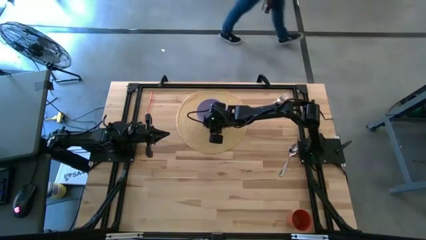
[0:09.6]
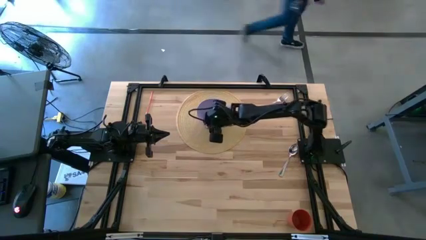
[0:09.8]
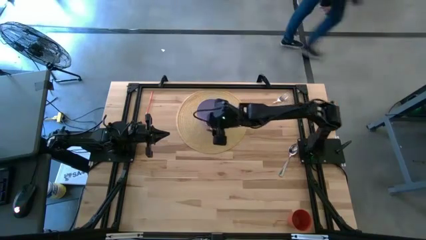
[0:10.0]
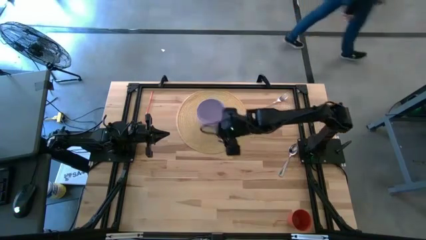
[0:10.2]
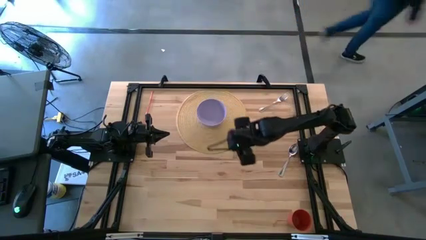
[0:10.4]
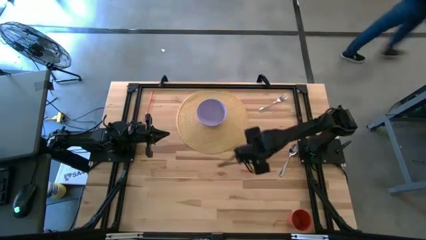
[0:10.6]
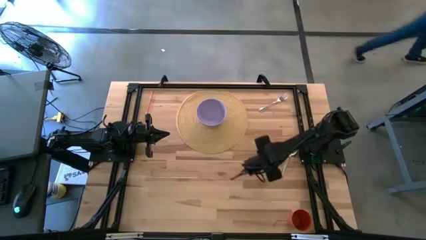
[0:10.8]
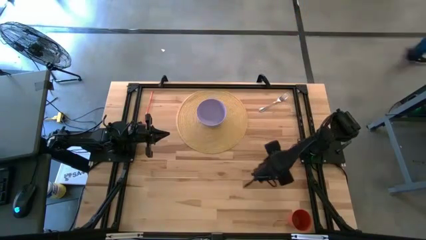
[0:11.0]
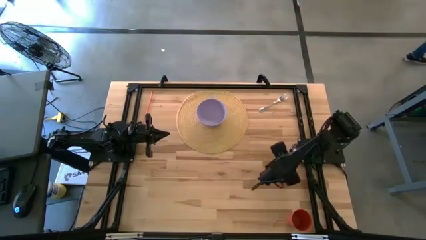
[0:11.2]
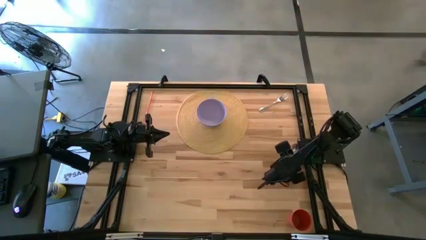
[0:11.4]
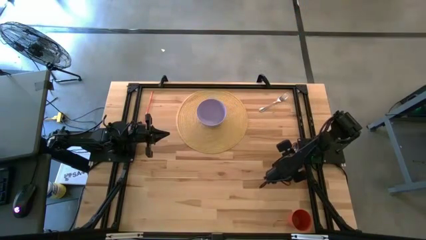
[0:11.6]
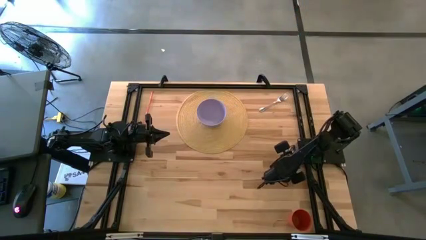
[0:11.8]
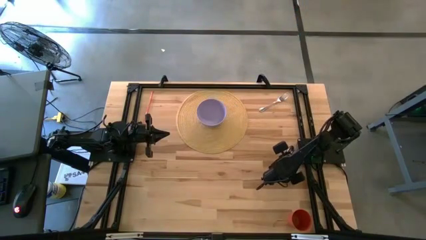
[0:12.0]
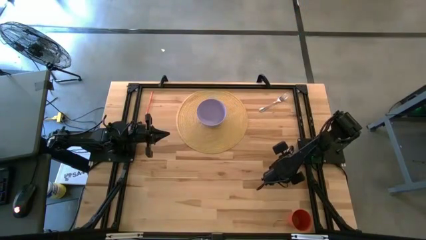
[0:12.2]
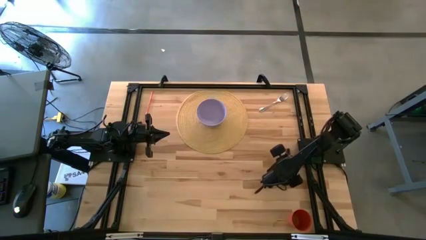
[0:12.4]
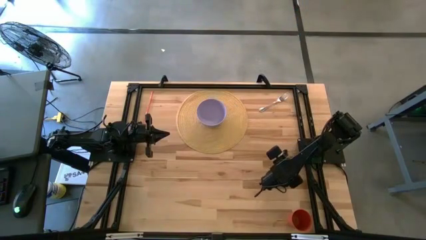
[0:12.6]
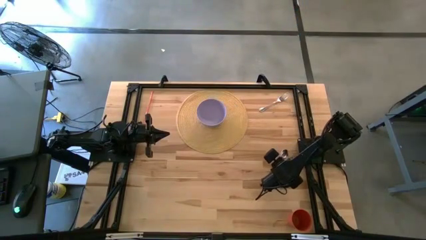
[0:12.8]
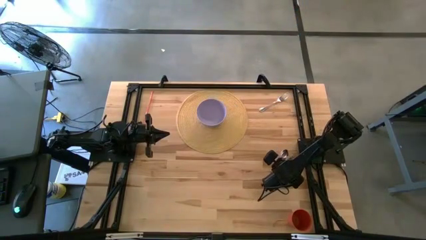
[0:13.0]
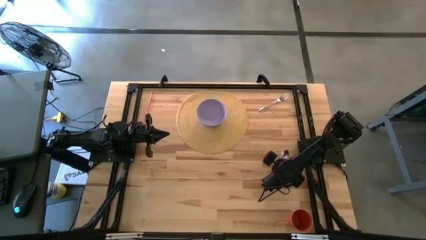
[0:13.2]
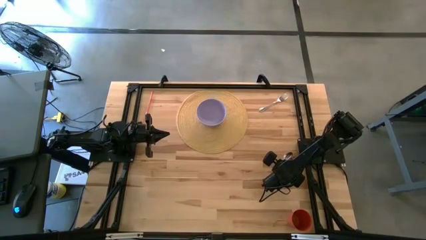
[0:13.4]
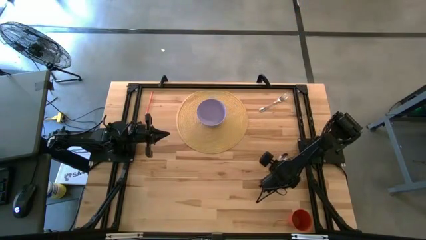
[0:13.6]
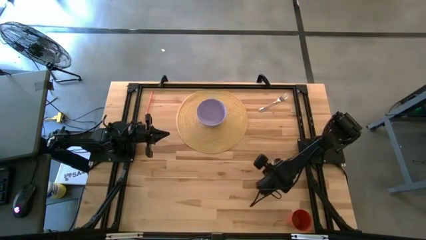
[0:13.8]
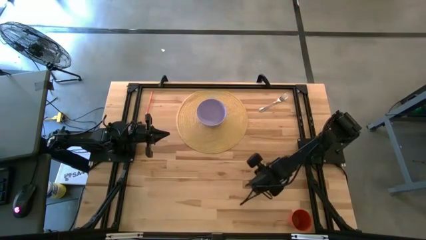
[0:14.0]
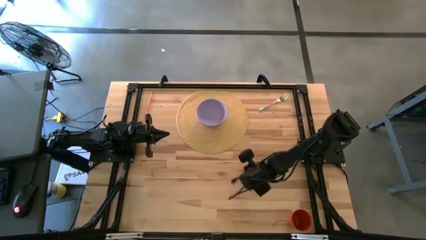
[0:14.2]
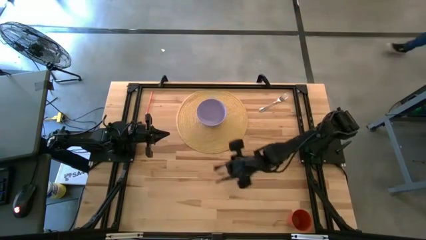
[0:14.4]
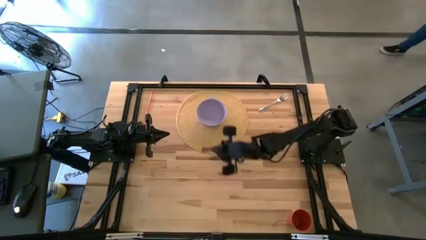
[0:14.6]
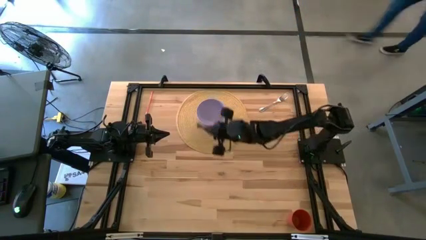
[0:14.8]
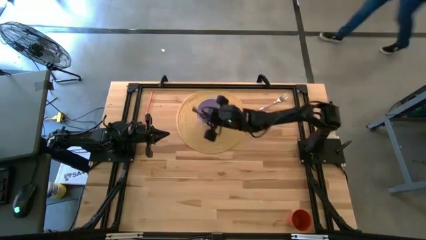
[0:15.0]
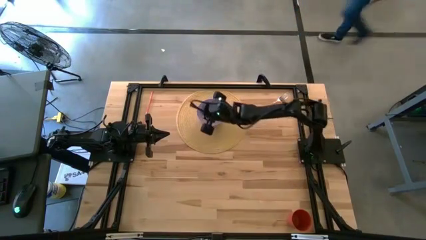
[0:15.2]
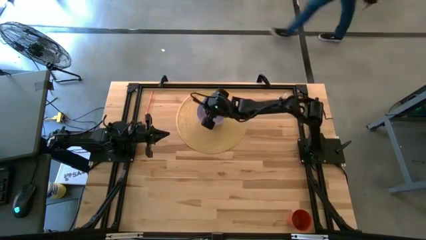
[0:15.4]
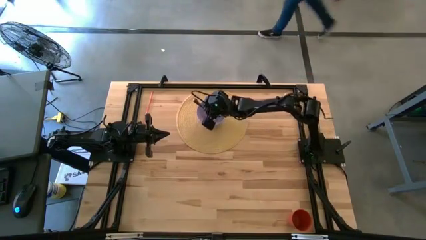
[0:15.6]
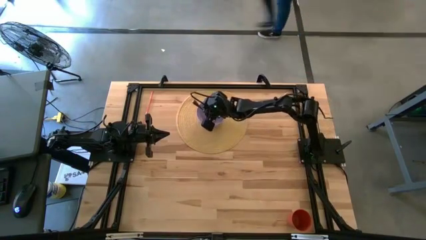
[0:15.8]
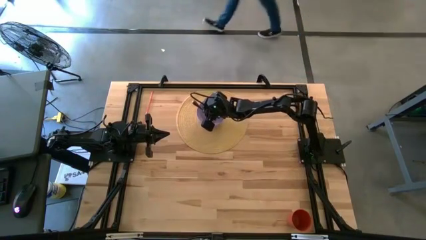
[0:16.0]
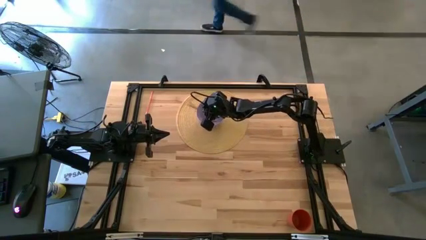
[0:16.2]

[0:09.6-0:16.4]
Task: Pick & Place Utensil
Put the silver spoon into the bowl on the yellow placemat

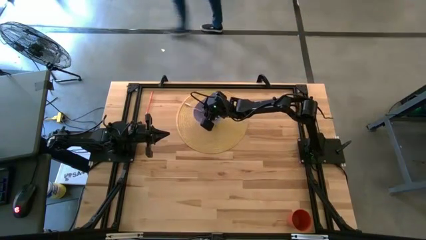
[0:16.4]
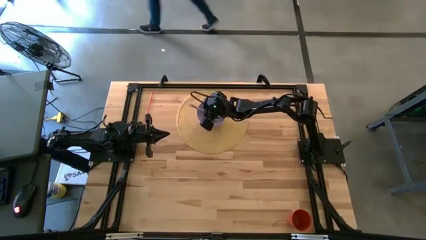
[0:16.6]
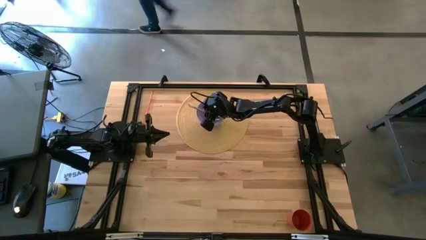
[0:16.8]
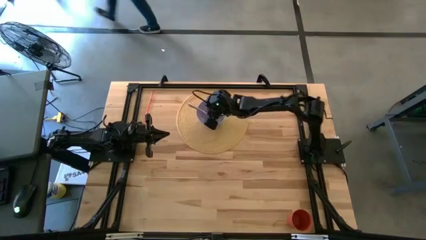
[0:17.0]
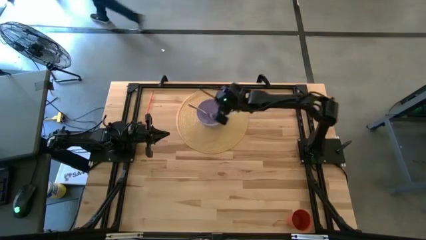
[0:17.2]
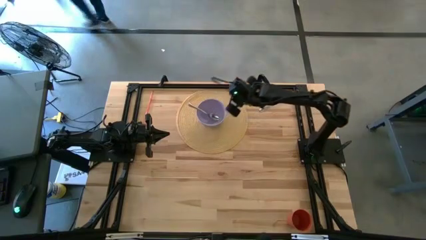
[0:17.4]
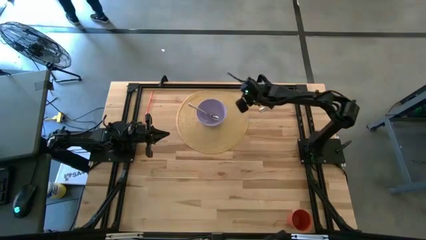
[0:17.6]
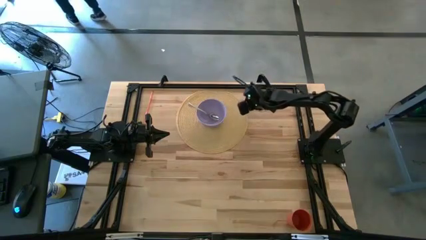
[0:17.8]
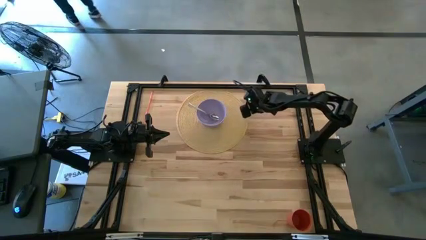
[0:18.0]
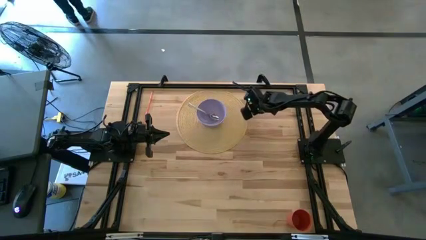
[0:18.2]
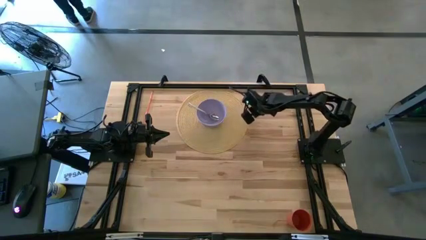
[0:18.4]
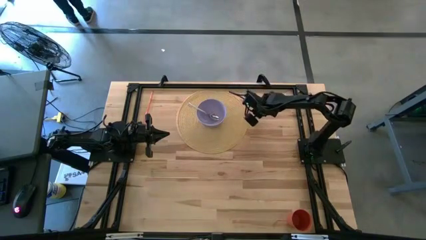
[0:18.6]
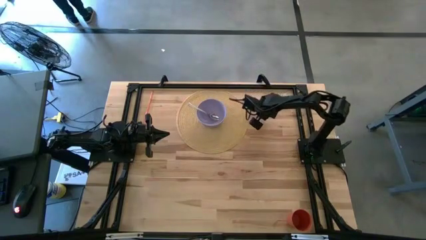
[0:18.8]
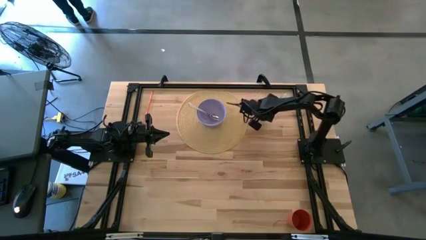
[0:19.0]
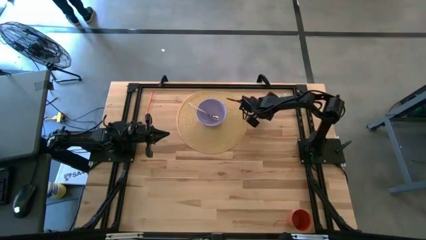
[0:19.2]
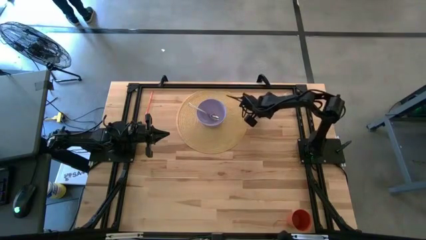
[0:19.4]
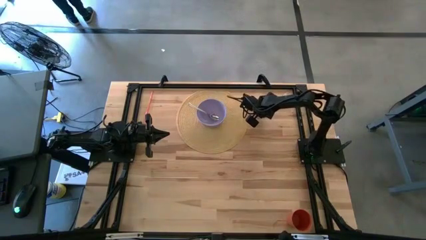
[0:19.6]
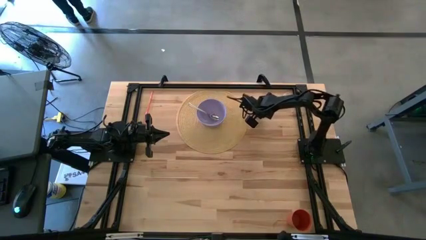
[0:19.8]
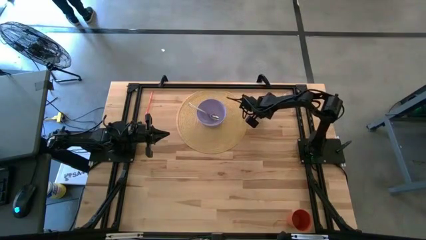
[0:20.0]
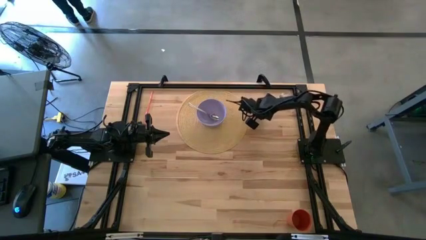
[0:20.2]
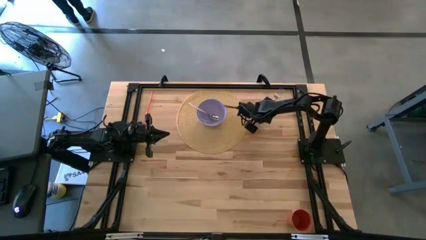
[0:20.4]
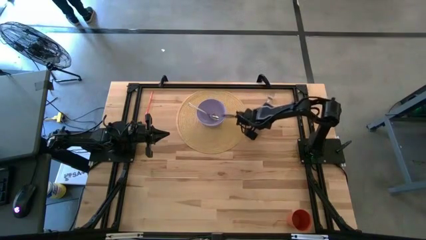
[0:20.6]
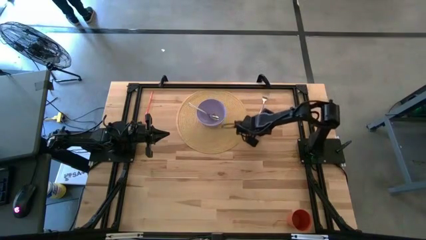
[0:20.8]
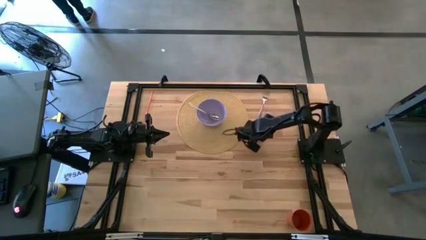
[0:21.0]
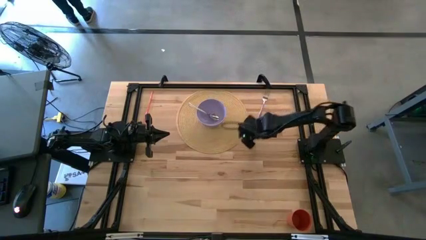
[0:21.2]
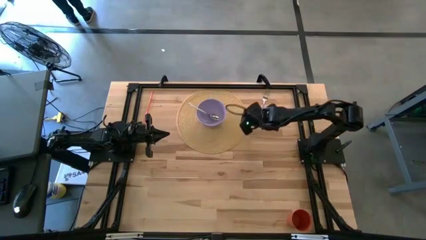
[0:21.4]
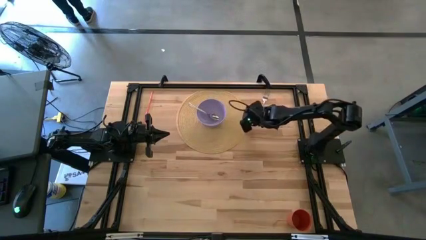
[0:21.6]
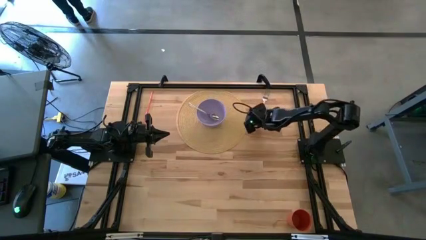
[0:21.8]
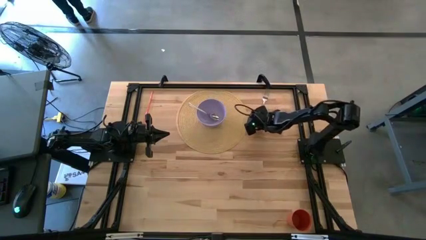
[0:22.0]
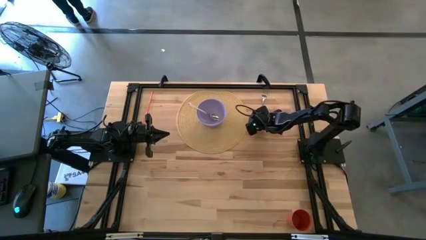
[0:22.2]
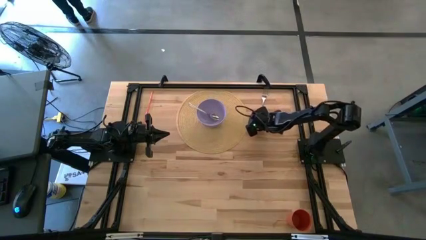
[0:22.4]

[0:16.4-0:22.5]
Put the silver fork on the purple bowl

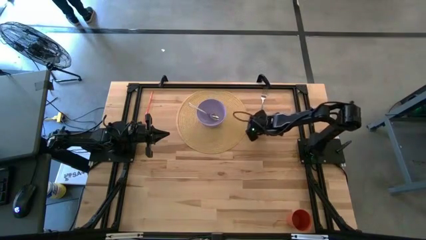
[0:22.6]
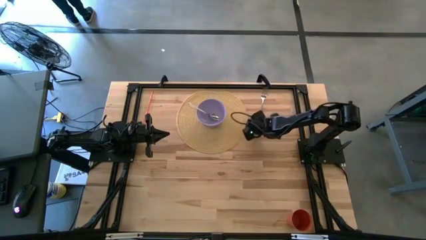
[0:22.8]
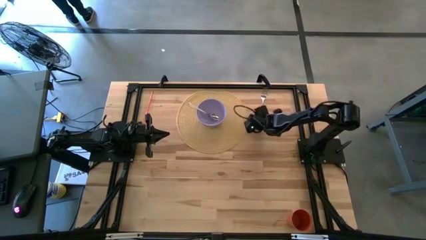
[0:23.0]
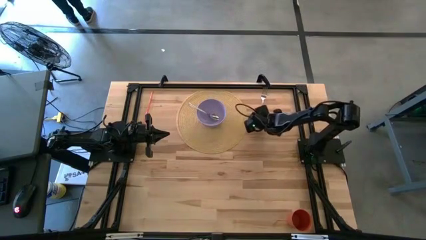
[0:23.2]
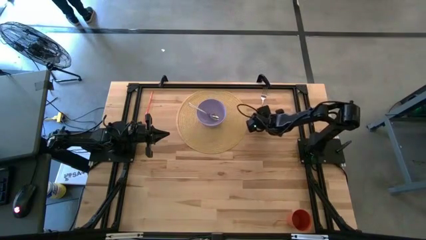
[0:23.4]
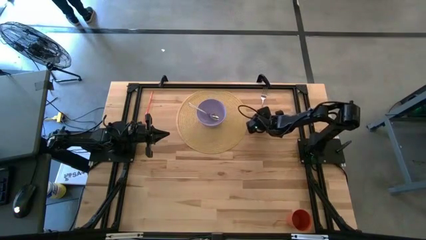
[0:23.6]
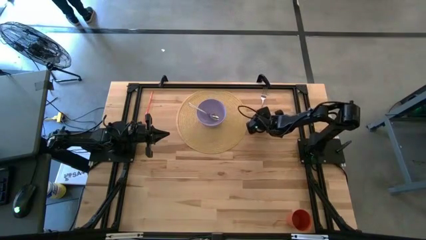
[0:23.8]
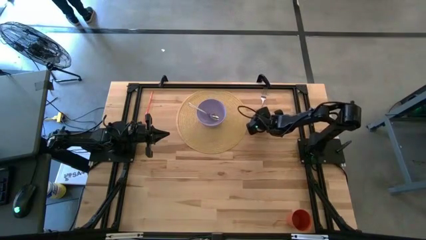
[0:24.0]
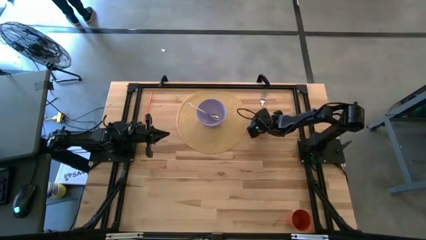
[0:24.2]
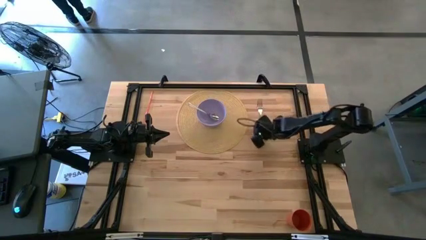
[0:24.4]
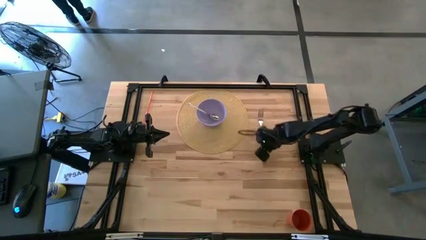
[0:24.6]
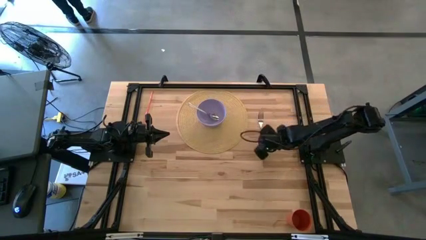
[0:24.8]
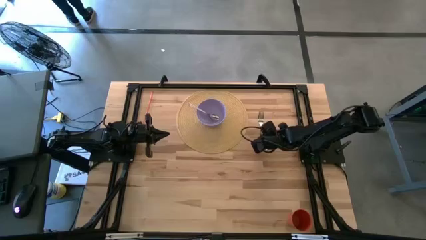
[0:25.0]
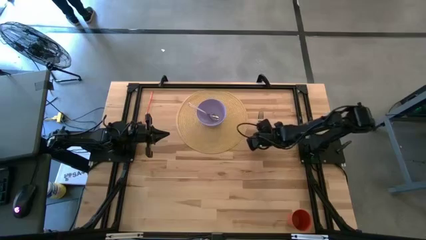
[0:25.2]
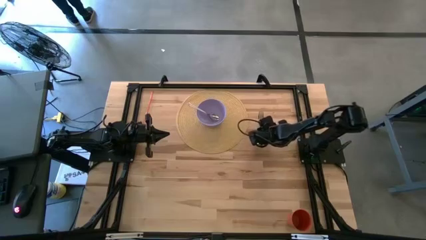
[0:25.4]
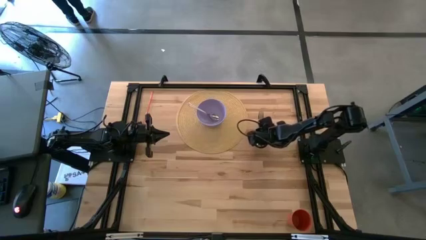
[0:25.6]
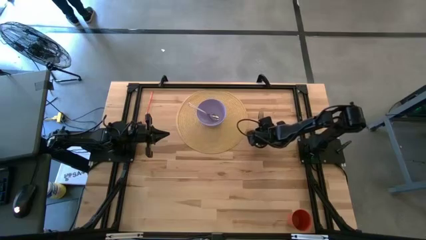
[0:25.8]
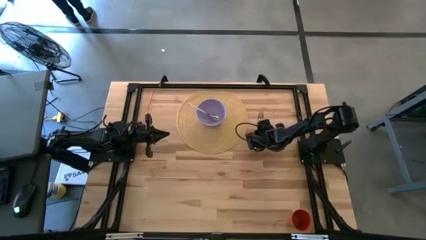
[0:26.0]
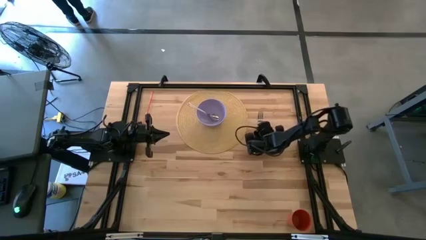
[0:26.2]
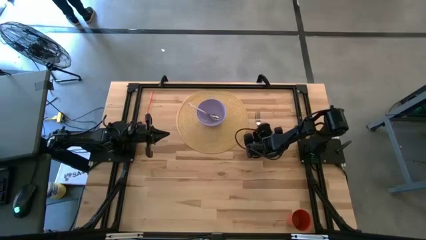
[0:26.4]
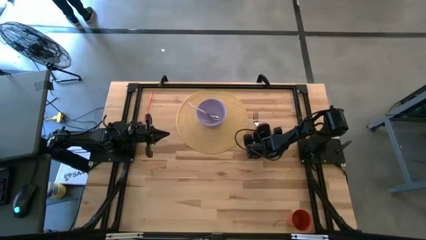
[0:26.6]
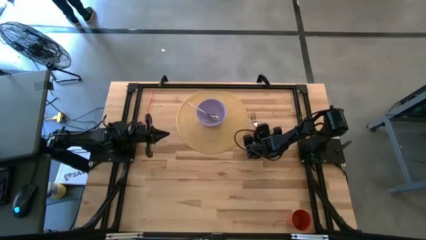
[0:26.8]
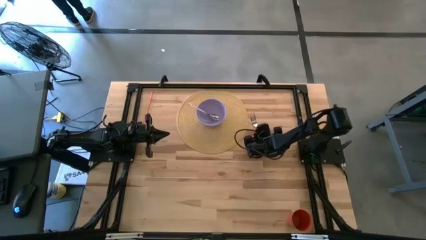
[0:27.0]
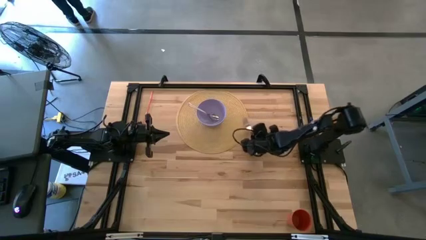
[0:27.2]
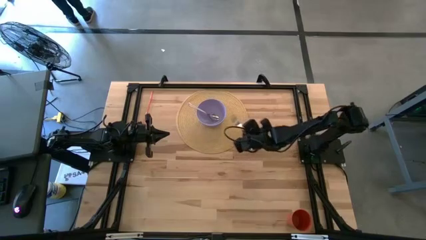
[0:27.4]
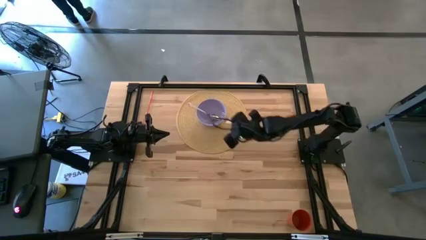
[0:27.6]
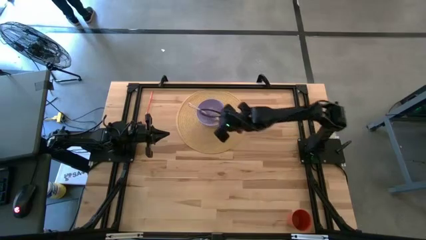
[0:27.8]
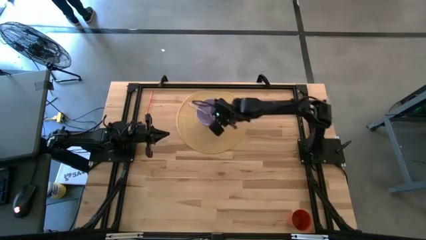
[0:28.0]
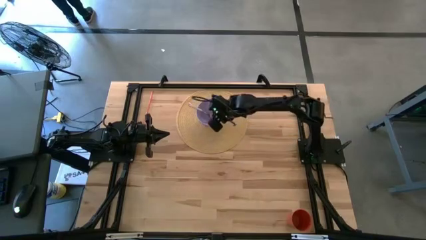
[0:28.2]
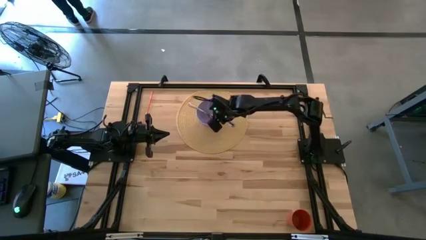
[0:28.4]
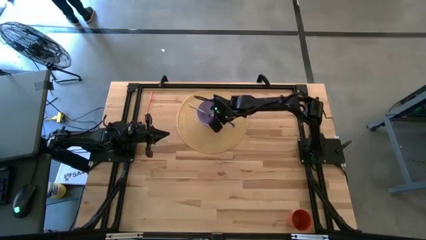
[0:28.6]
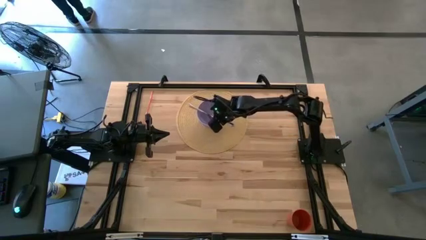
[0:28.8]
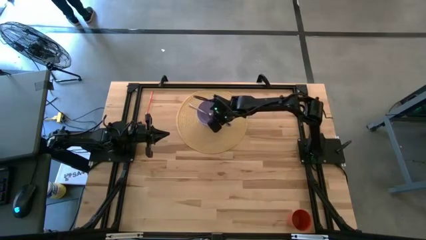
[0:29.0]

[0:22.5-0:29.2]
Put the silver fork on the purple bowl
